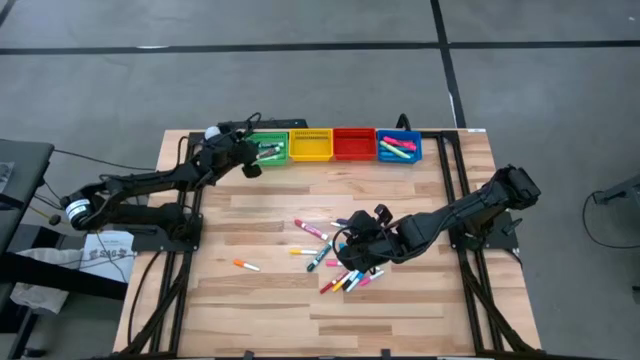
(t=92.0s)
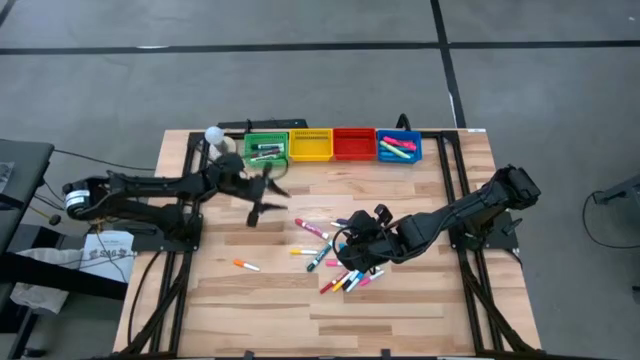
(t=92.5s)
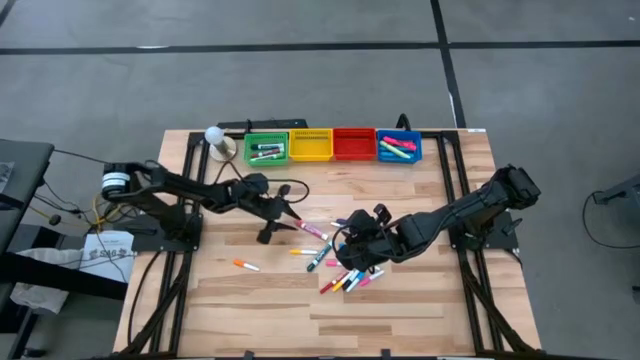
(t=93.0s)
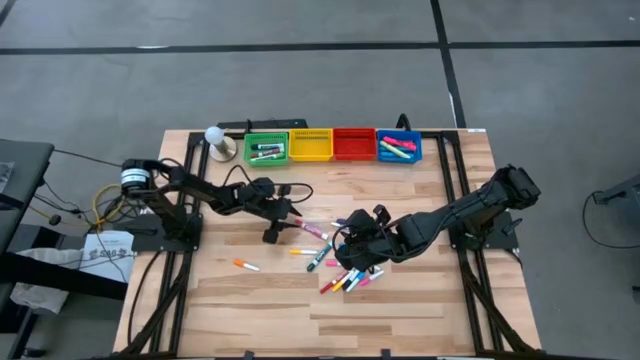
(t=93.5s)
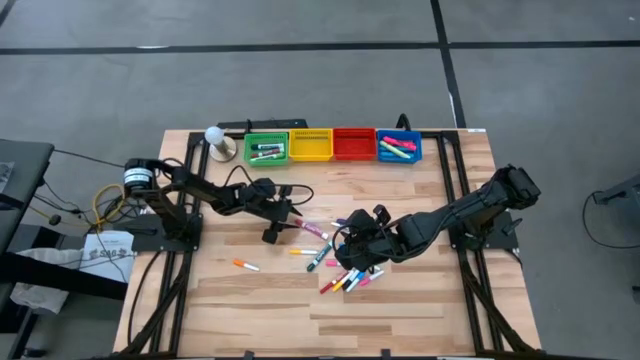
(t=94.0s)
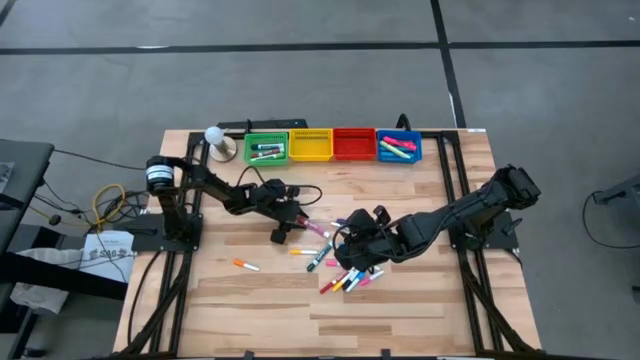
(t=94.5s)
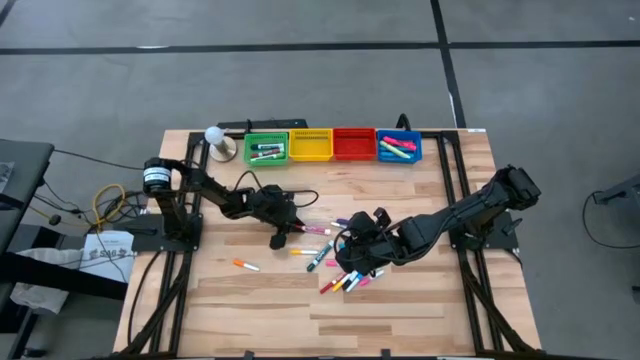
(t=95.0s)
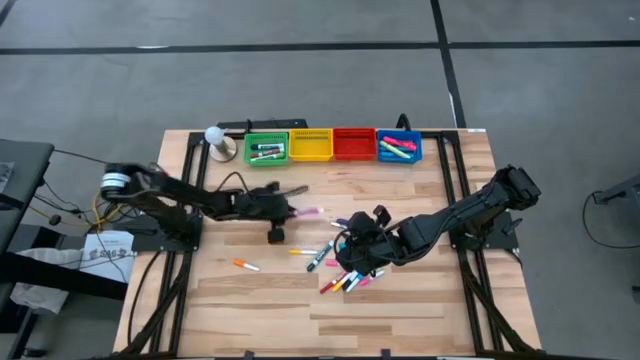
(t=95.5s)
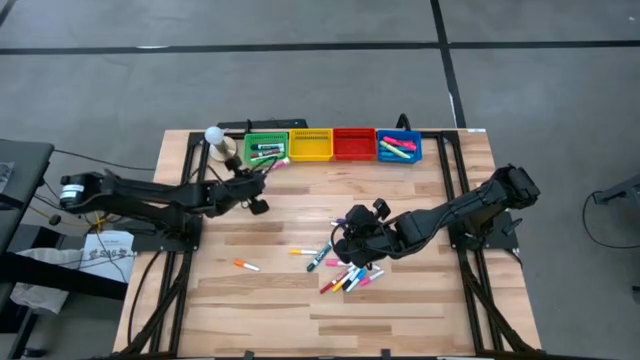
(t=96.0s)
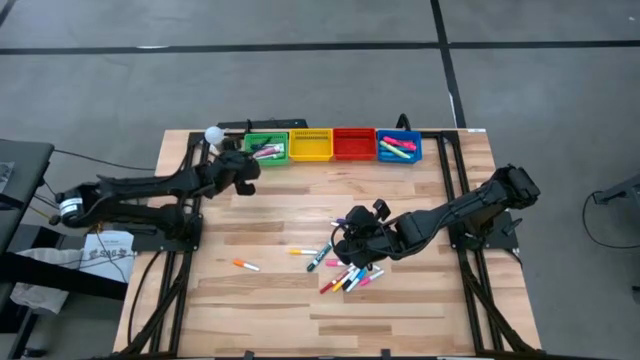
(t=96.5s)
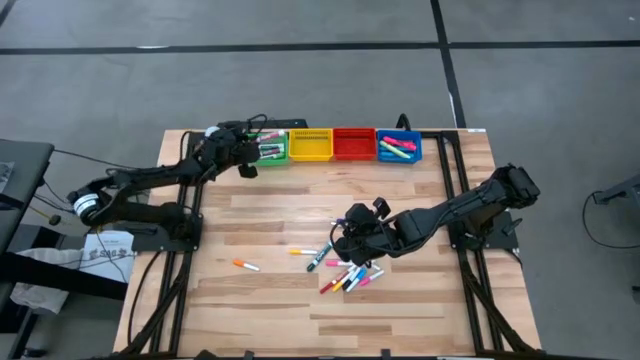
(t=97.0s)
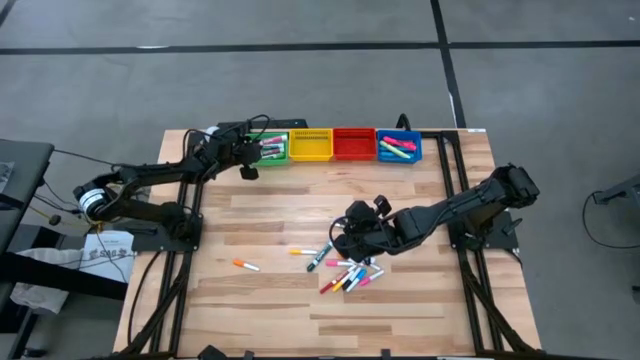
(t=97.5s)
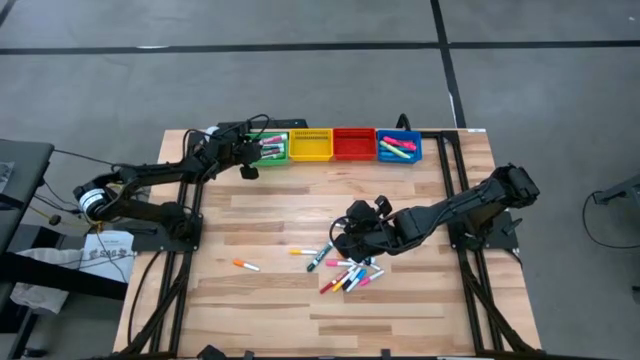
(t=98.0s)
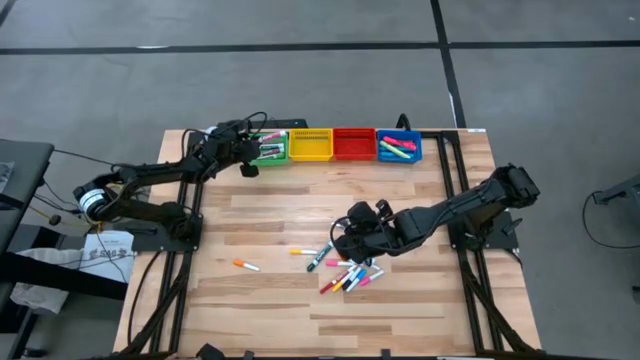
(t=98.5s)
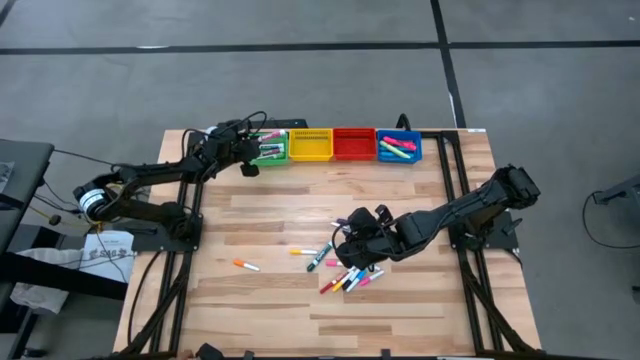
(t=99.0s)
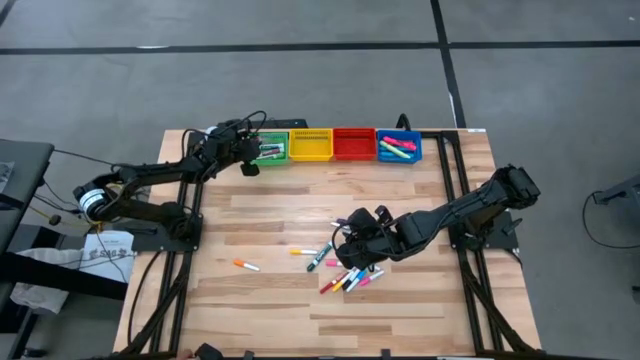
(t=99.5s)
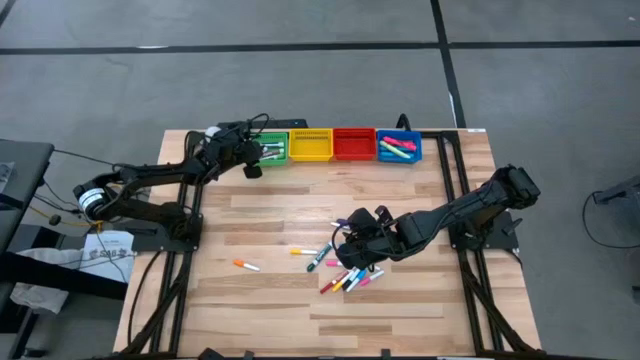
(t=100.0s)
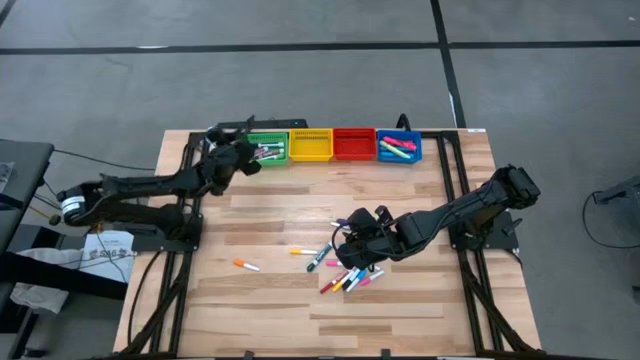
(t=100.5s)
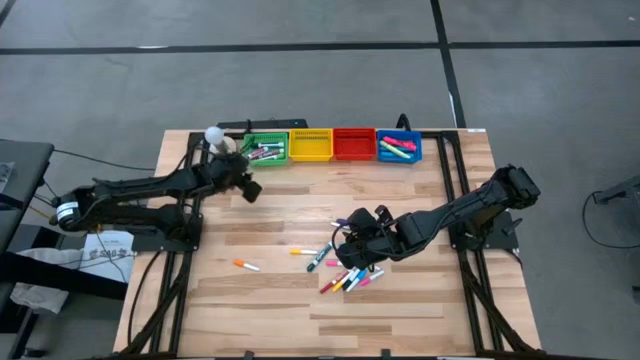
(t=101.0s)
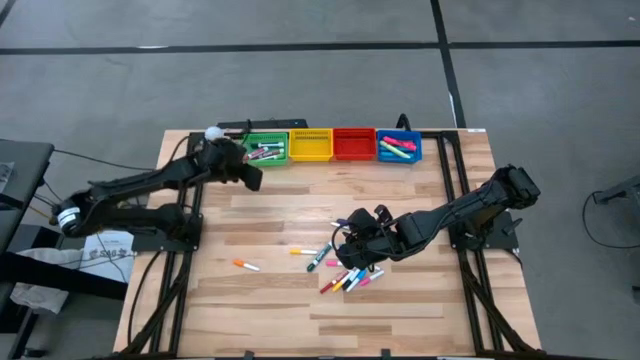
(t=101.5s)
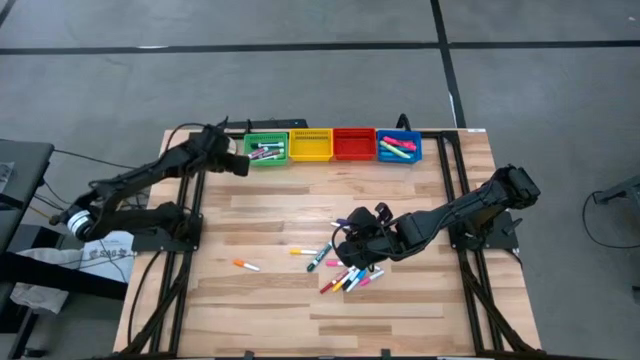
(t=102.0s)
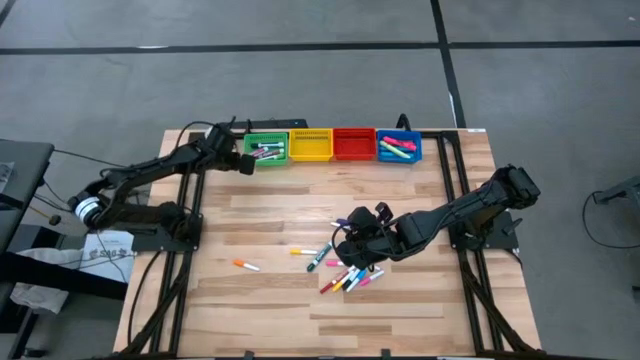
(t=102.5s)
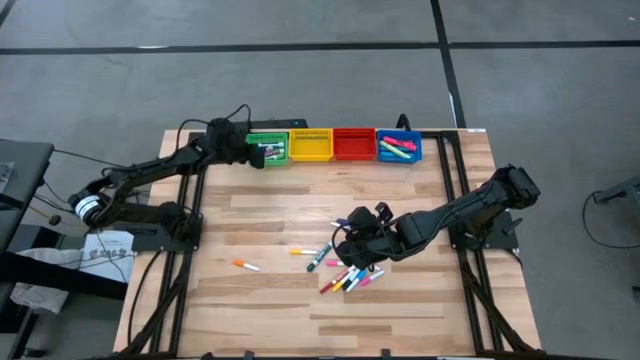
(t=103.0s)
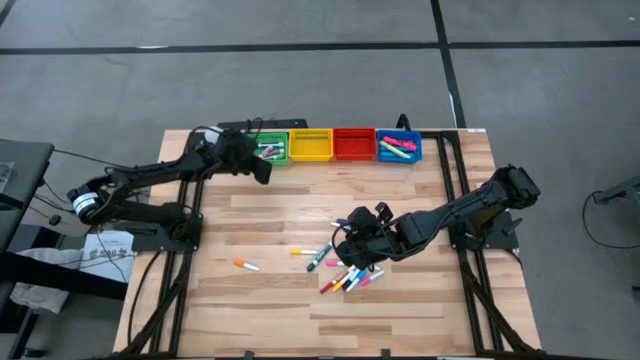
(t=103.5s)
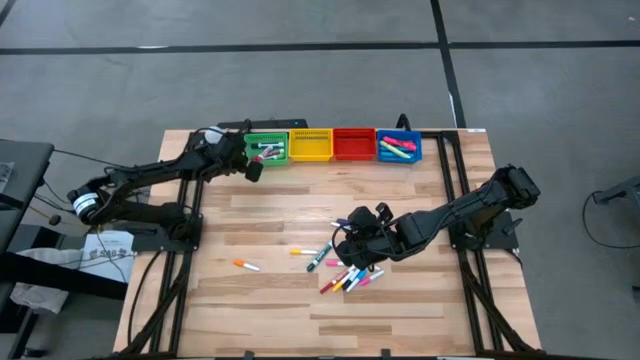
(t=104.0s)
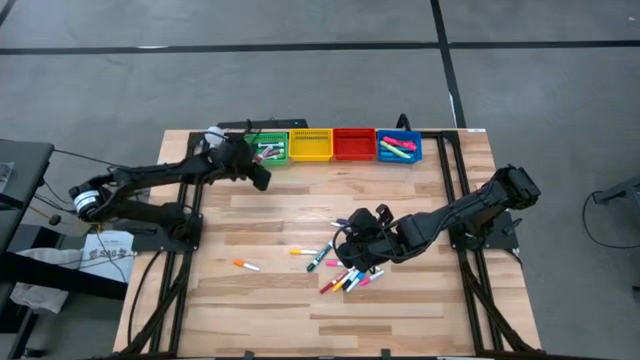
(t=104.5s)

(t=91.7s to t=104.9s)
Task: Pick & Place Markers
Put the pink marker pen into the green basket
